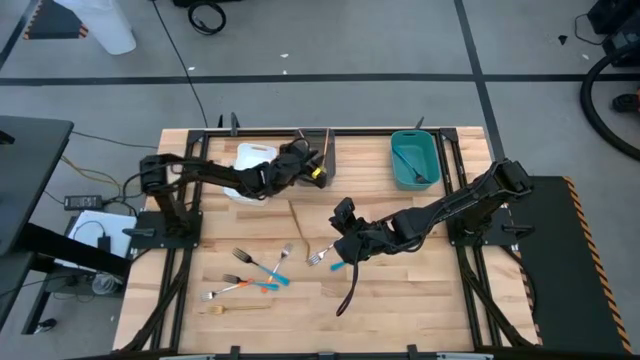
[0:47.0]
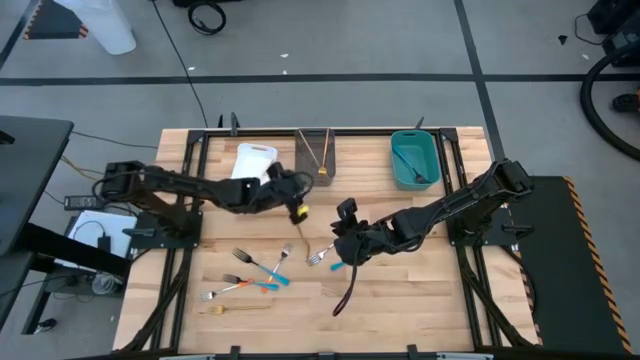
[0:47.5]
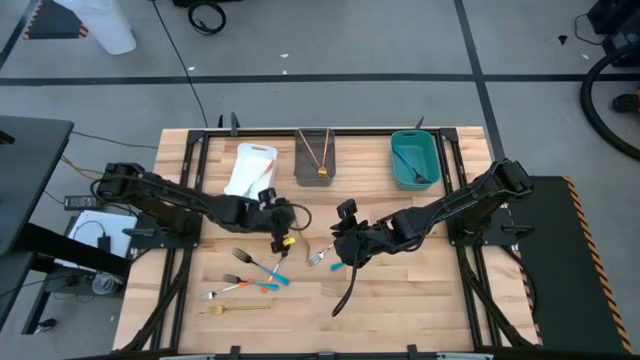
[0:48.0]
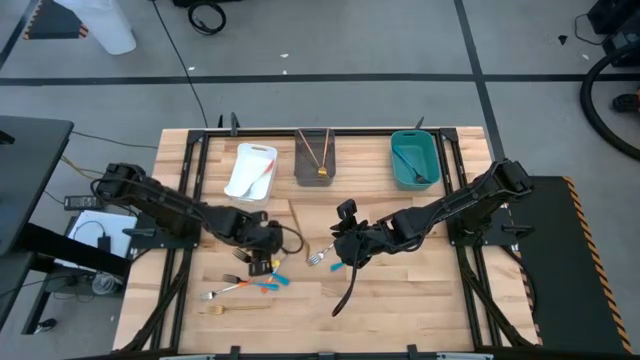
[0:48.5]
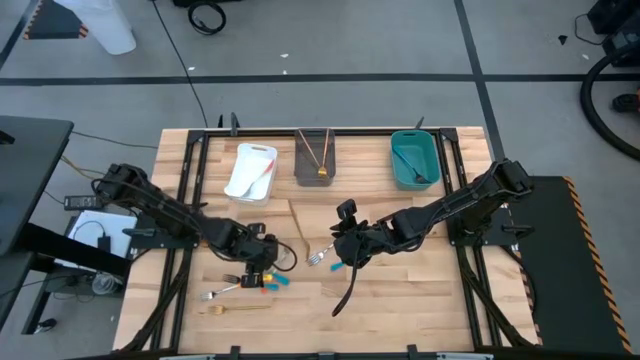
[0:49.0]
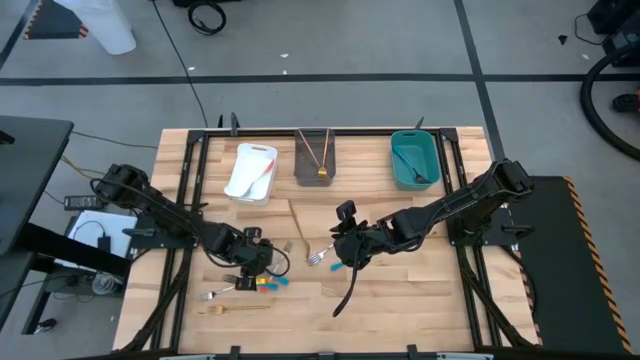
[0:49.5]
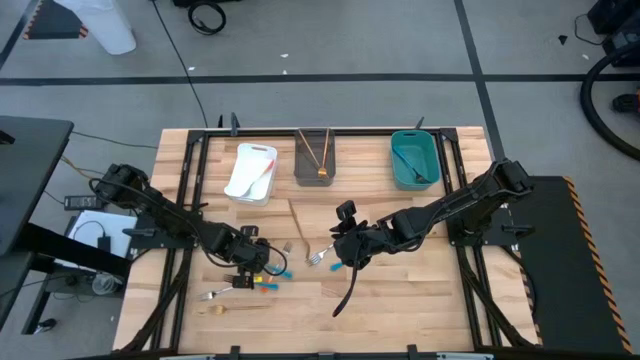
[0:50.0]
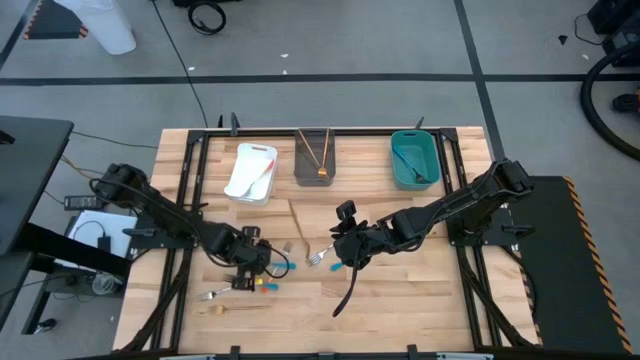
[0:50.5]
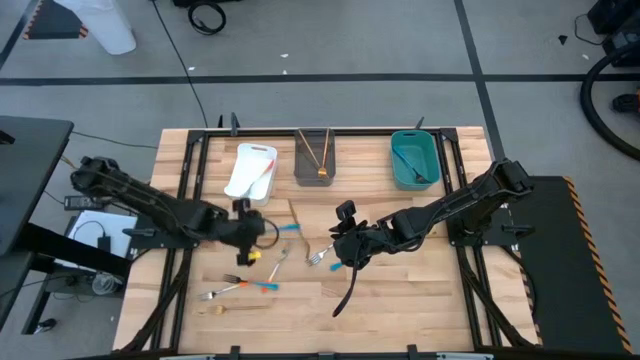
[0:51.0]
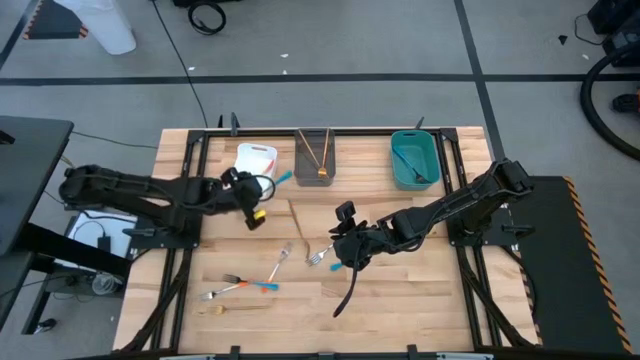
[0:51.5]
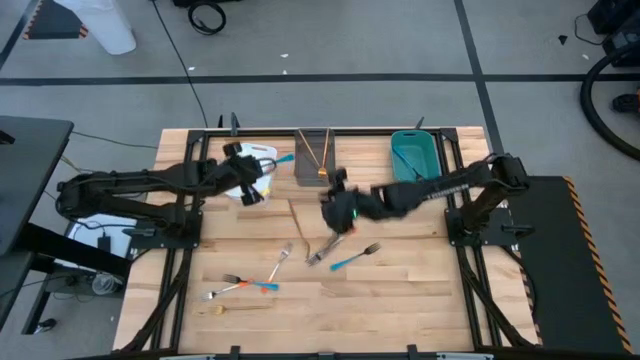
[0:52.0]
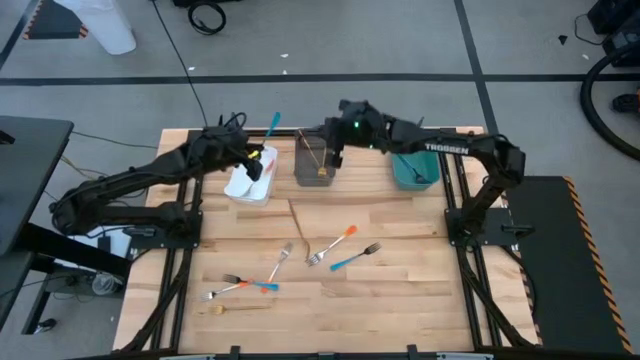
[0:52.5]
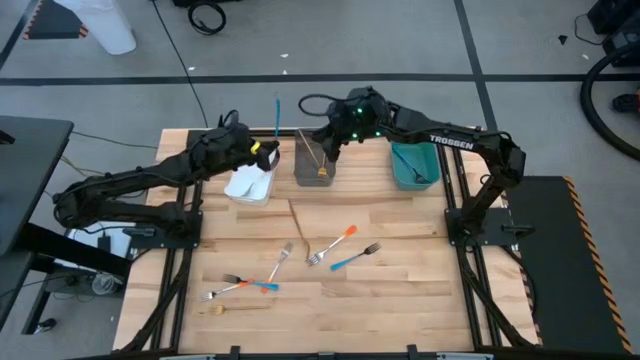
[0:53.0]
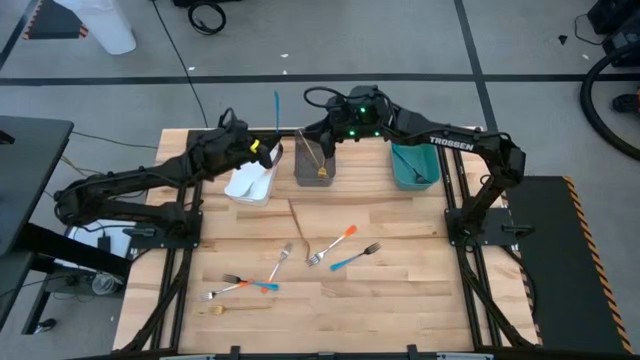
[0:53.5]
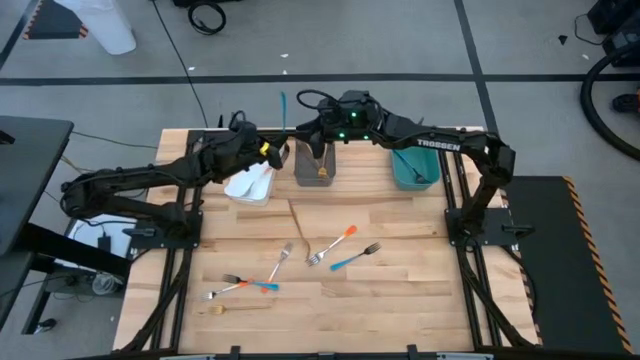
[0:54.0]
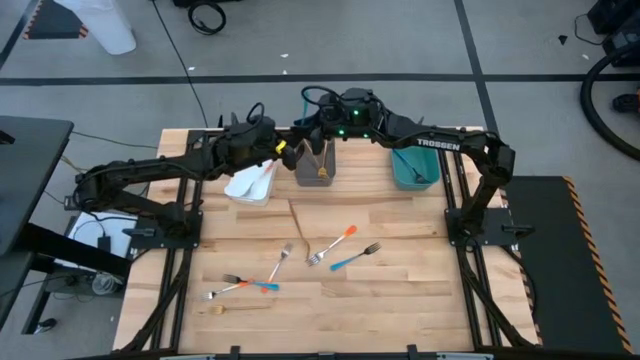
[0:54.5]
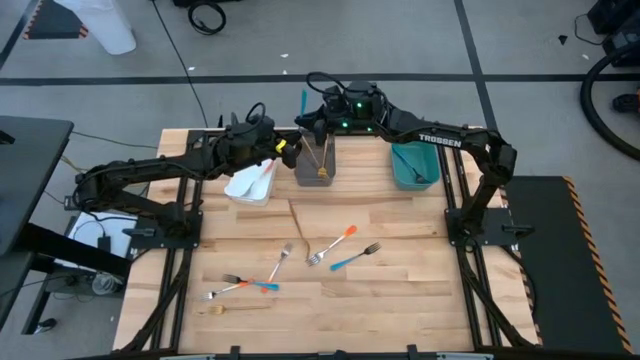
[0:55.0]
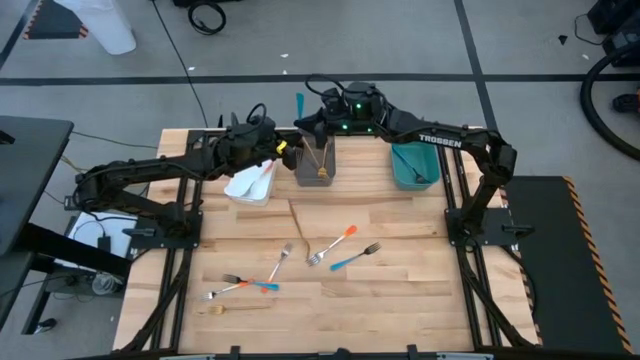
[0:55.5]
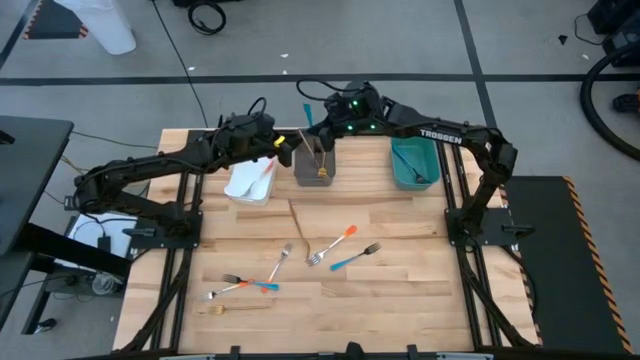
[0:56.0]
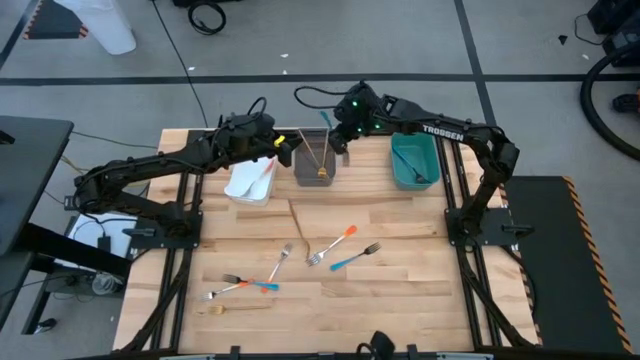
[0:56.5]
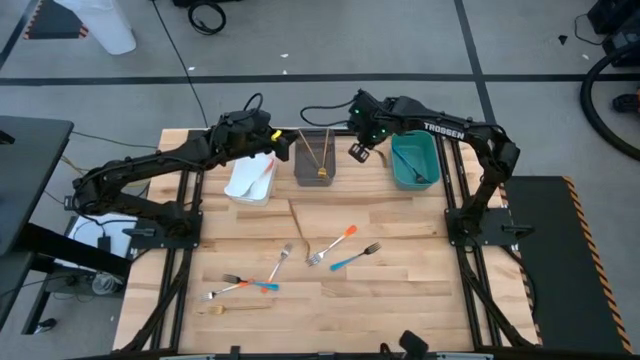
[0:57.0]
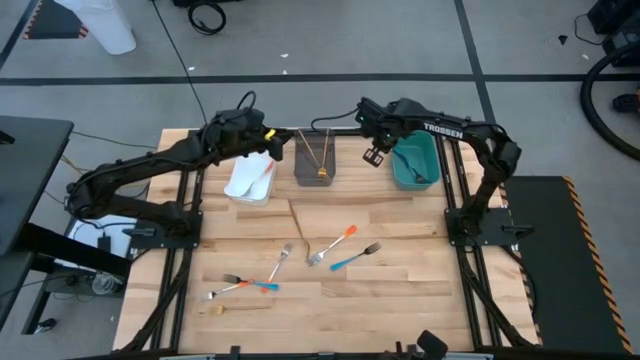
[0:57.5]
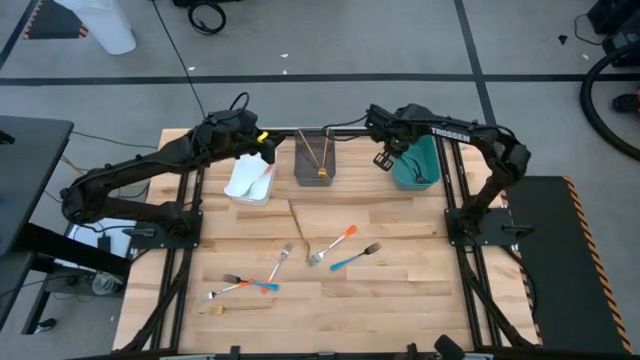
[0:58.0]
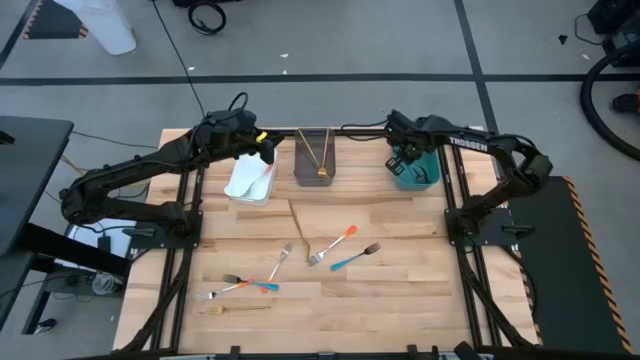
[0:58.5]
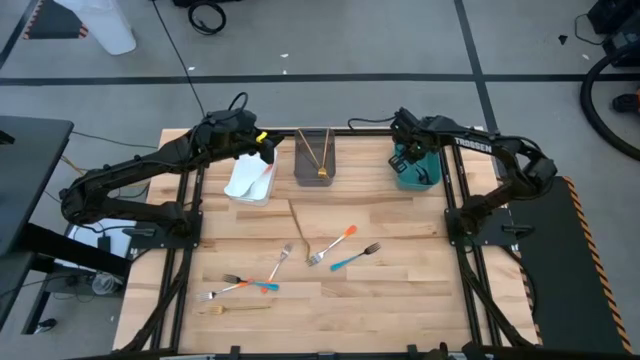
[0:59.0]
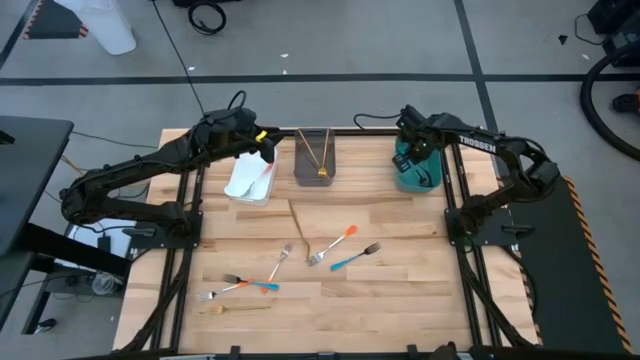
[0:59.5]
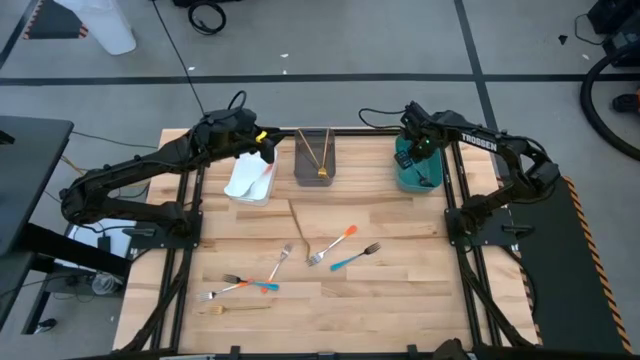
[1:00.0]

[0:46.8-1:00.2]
Task: Sort silverware by color (type)
Put the blue fork into the green bin

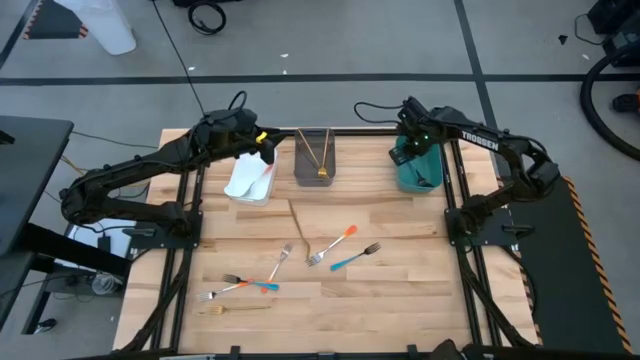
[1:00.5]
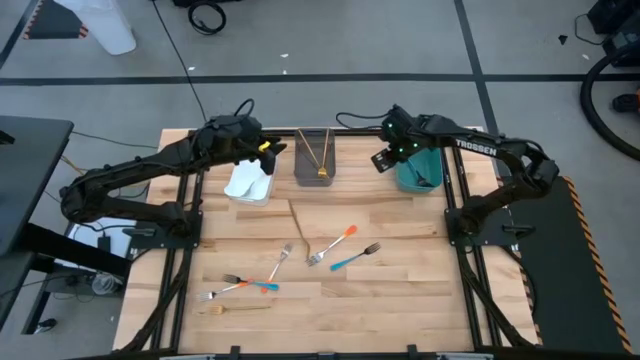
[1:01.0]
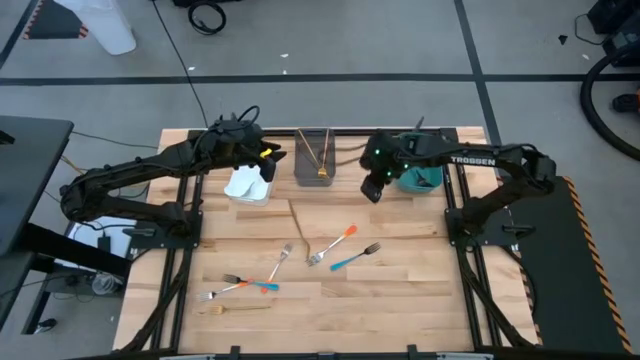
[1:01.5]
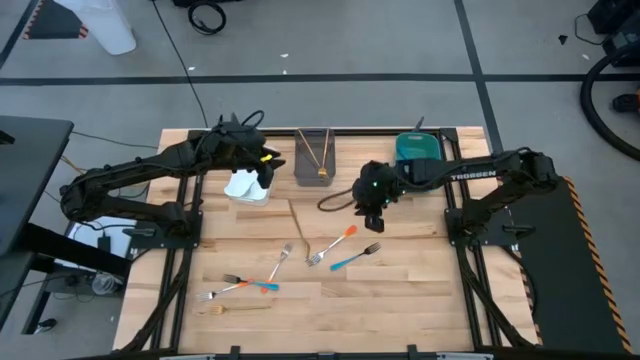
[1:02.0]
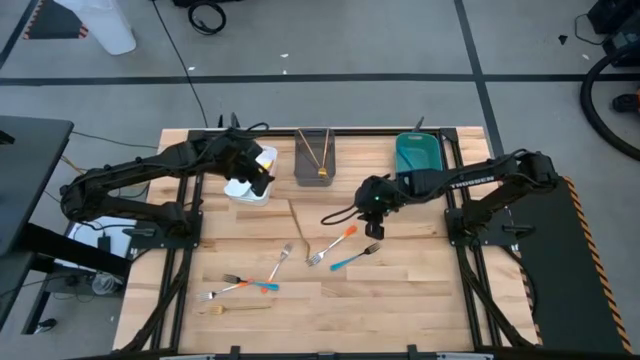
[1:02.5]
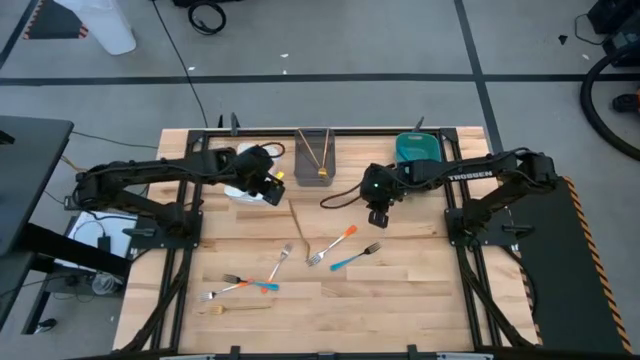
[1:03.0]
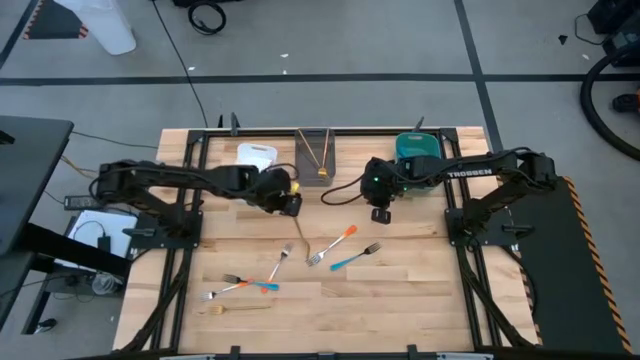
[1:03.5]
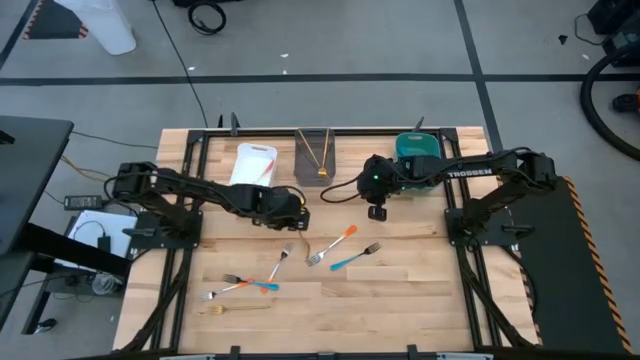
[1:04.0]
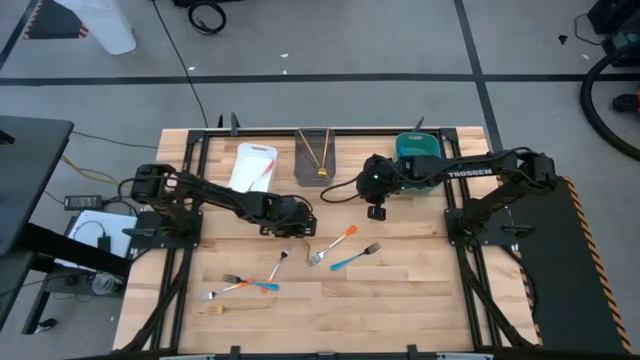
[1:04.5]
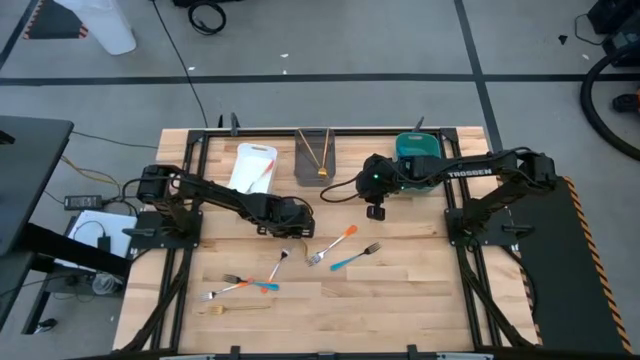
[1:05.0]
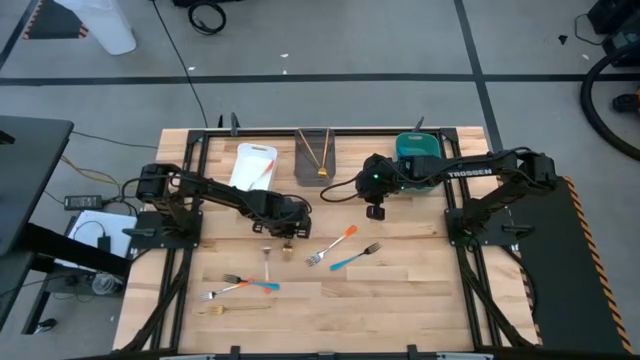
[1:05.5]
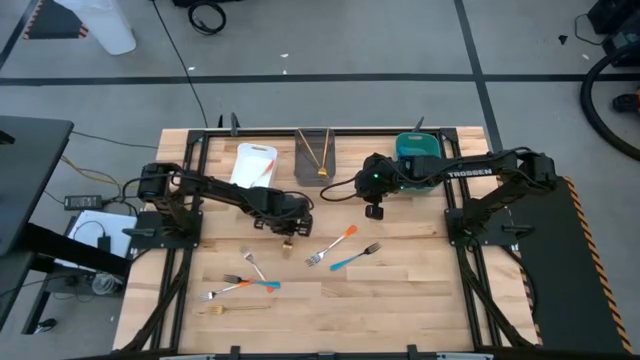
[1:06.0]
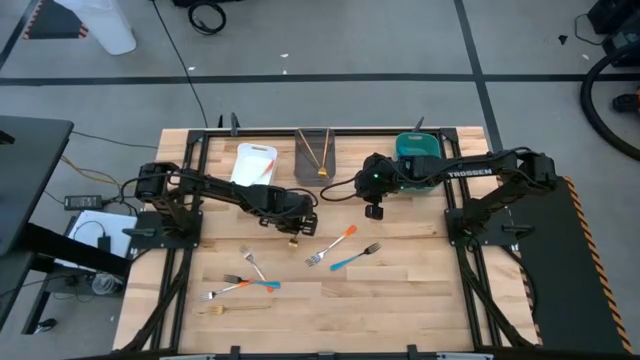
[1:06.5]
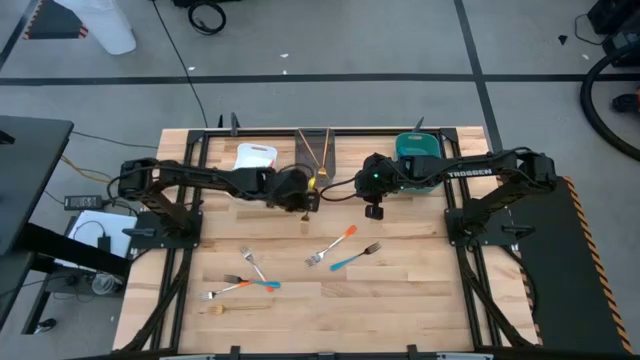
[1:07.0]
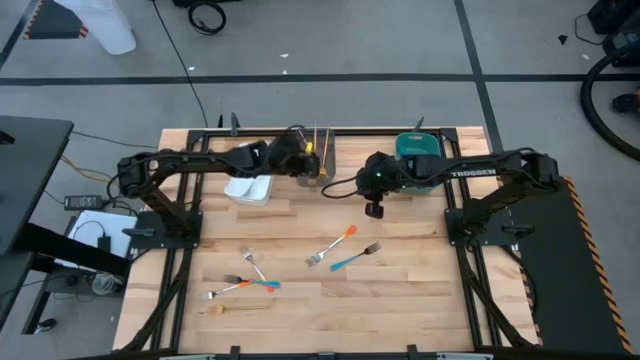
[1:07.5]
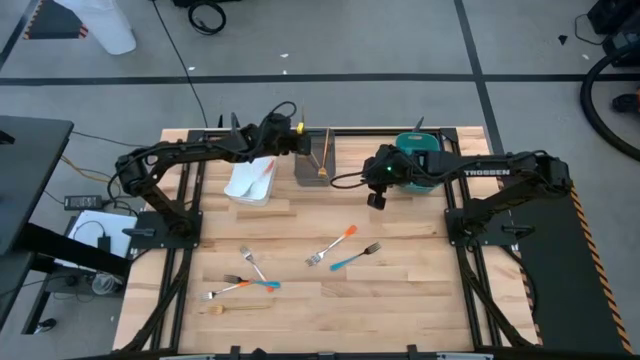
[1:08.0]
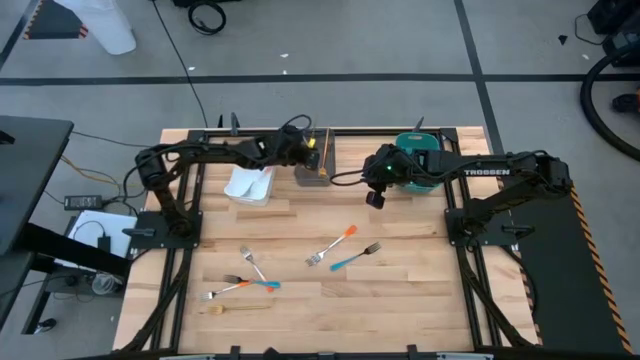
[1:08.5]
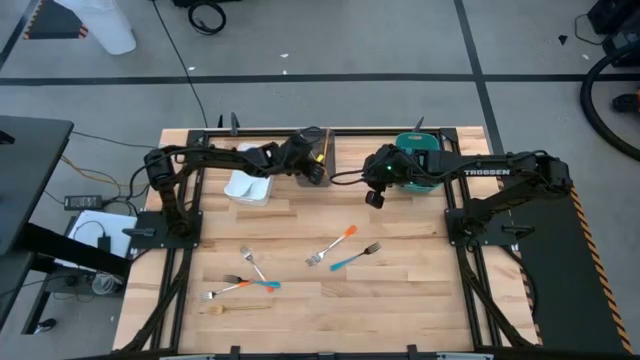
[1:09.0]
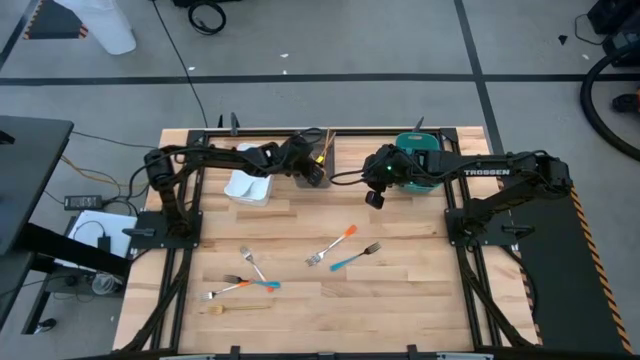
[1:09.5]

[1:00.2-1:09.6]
Put the yellow fork into the black bin
